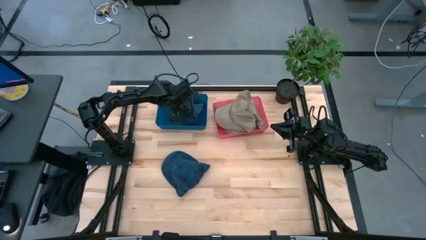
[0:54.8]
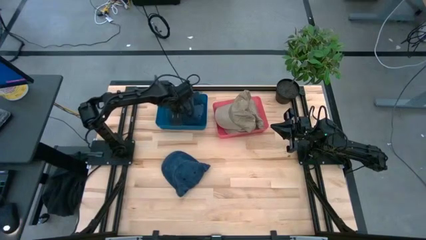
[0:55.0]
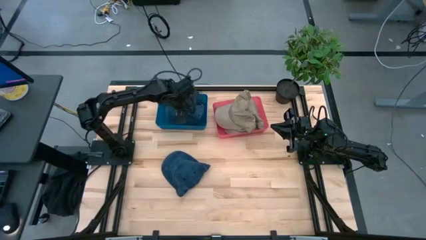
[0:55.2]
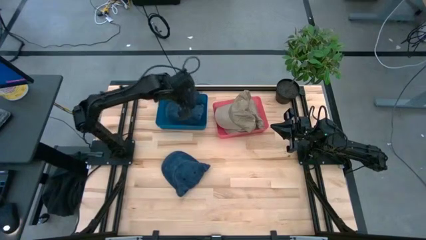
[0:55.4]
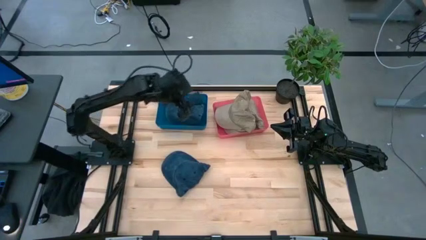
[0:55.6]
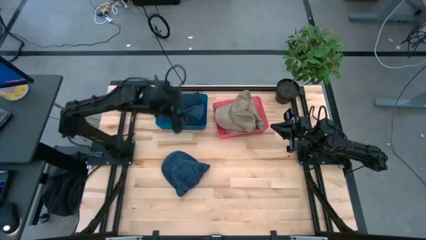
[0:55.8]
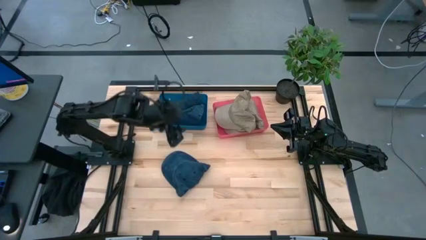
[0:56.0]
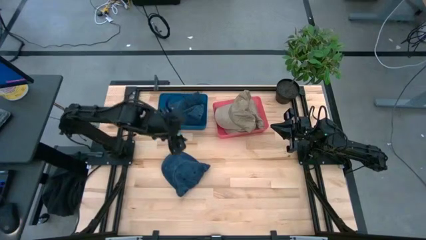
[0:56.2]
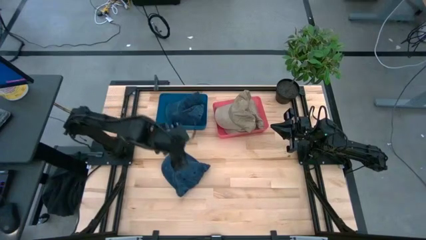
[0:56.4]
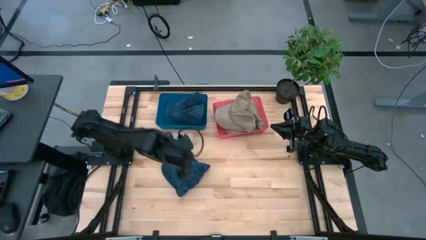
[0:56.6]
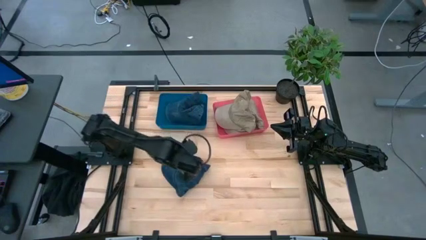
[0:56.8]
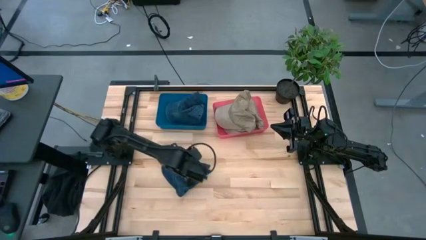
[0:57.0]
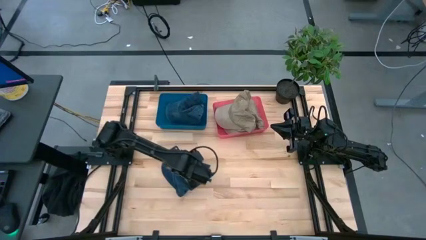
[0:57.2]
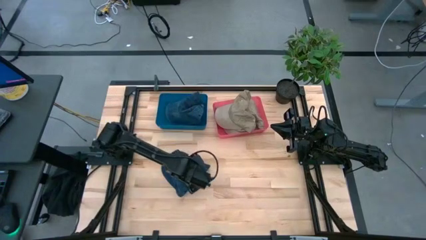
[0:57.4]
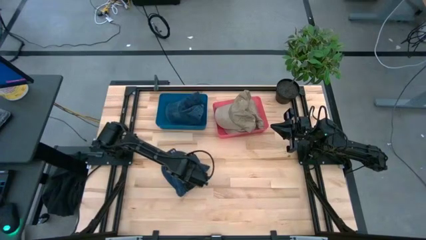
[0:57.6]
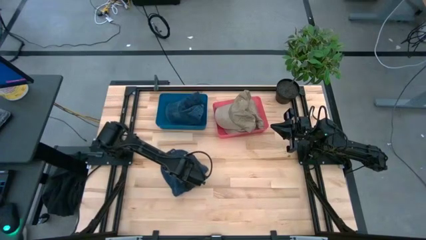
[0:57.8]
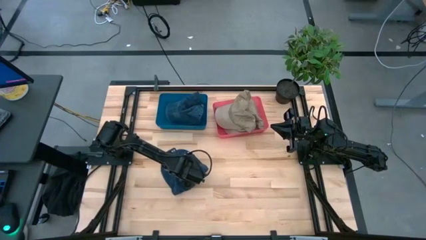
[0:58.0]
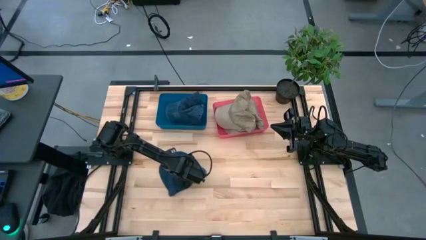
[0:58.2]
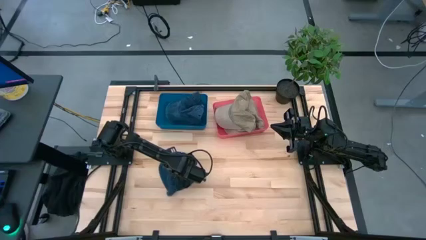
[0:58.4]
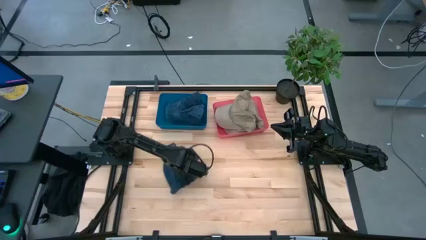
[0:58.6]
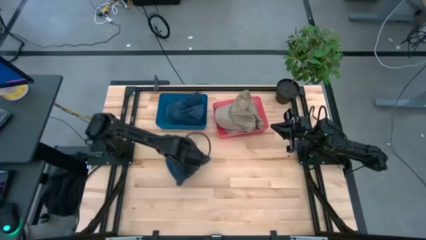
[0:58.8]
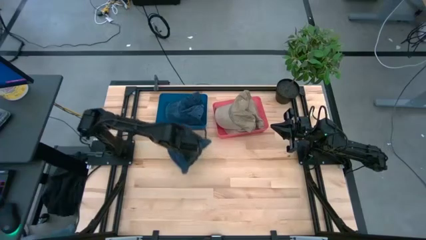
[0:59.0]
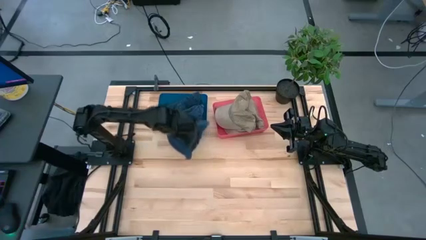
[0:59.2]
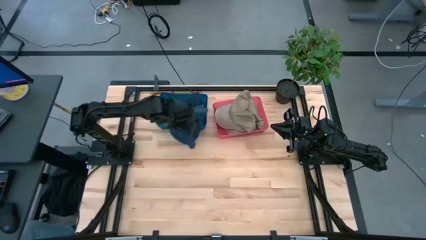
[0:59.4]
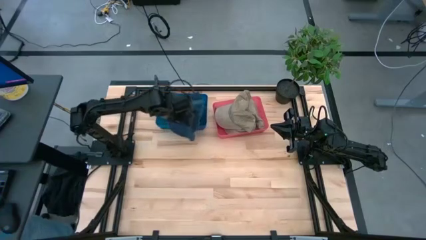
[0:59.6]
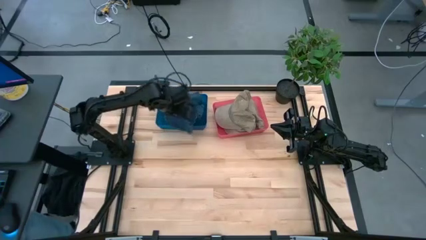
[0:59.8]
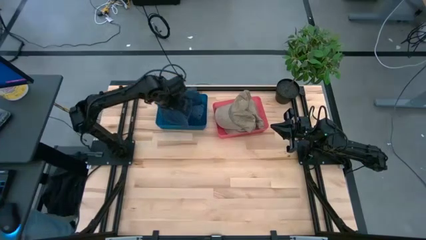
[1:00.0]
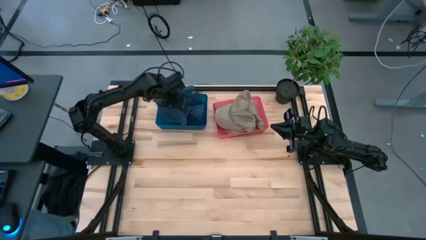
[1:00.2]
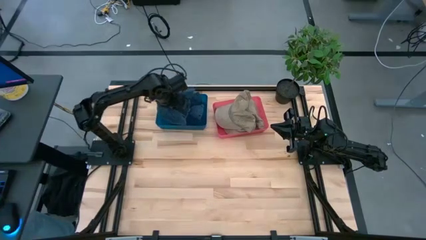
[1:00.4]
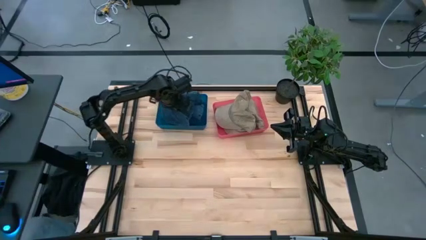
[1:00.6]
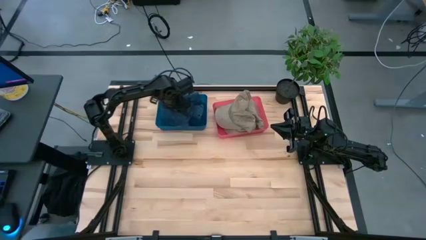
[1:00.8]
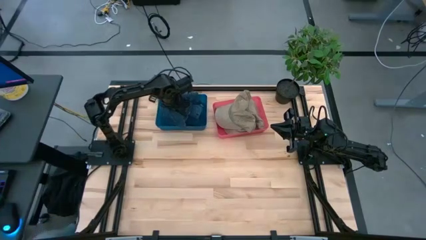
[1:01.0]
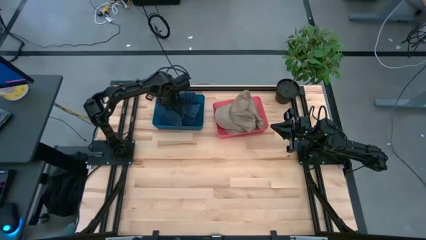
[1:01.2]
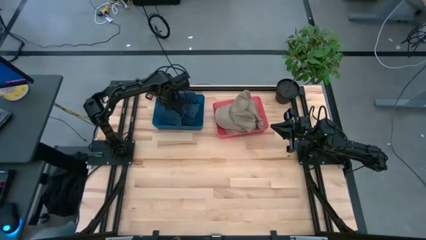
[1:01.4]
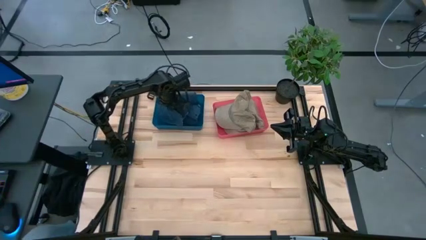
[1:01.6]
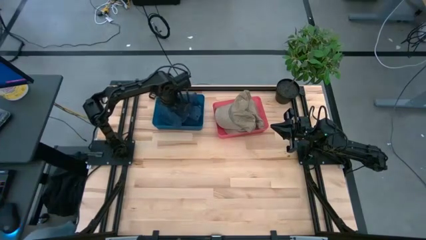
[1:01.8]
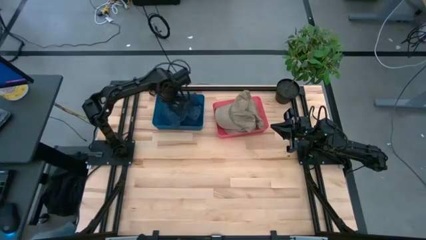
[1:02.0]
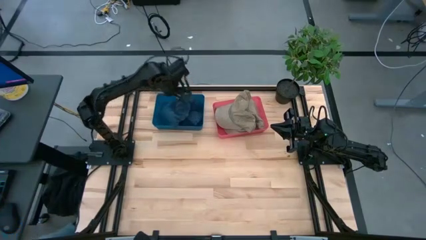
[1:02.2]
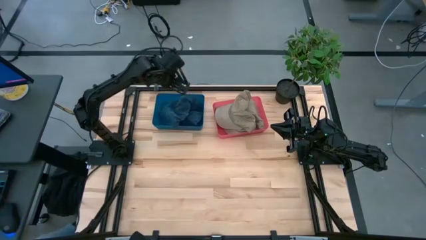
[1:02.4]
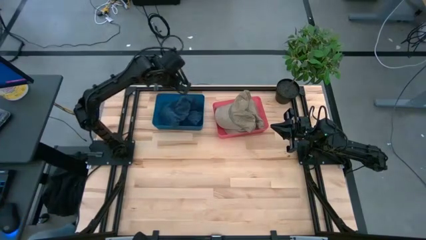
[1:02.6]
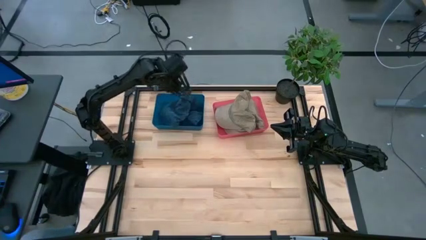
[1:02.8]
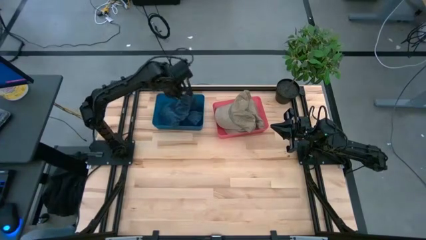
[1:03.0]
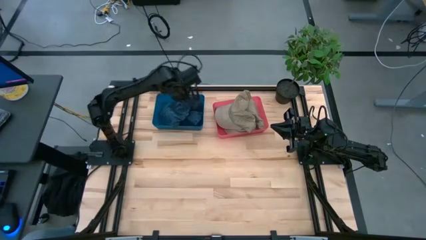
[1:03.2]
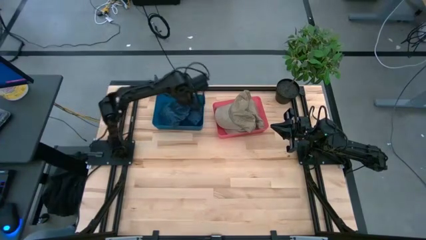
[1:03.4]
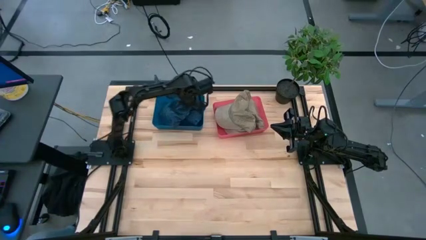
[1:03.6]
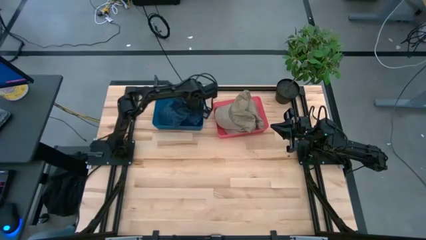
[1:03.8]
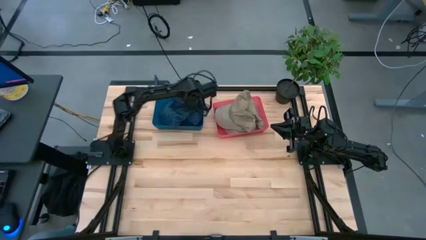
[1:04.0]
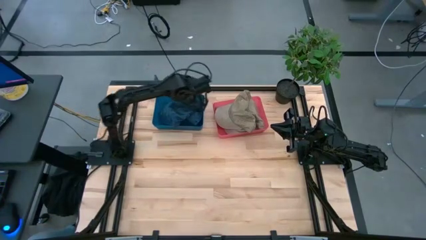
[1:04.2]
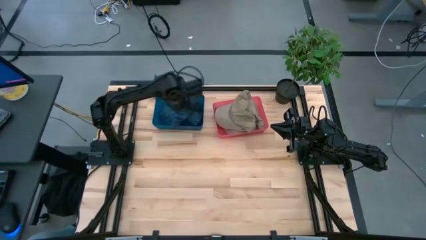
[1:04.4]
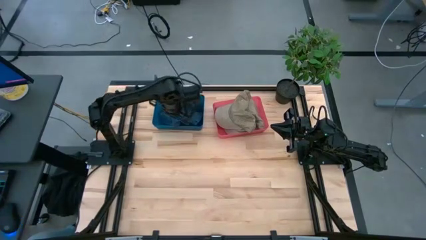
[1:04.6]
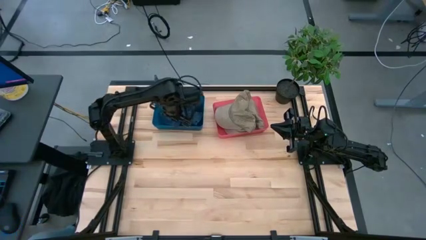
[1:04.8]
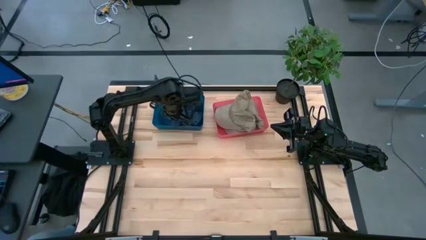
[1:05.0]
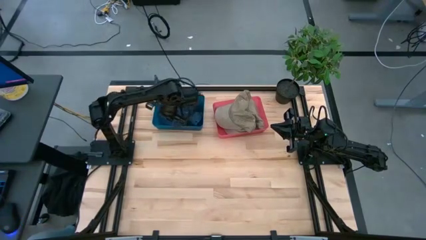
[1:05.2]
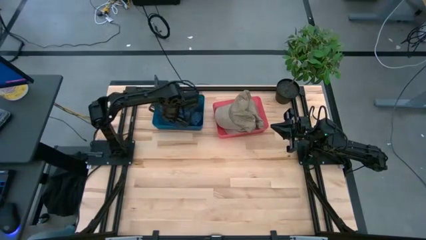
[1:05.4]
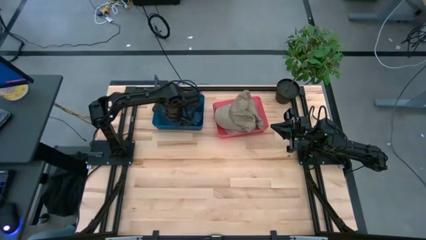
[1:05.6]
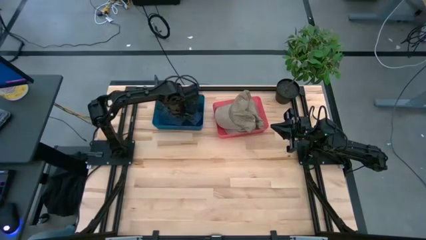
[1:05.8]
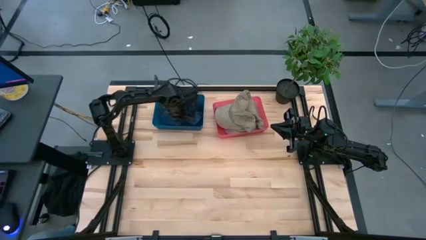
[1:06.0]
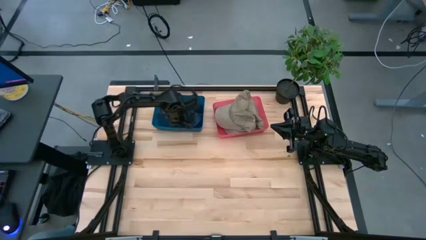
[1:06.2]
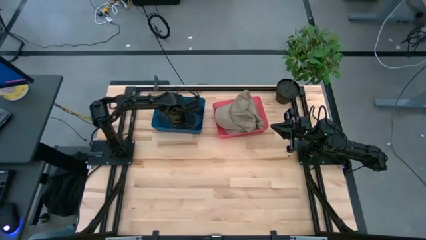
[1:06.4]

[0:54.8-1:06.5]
Task: Pick & Place hat
Put the dark blue cap into the blue bin
